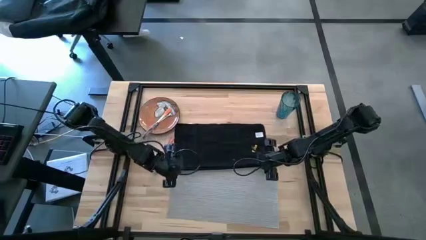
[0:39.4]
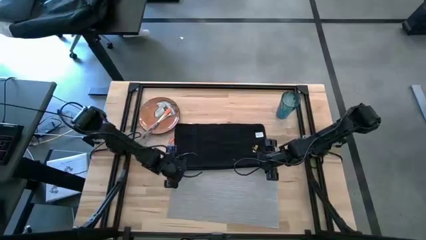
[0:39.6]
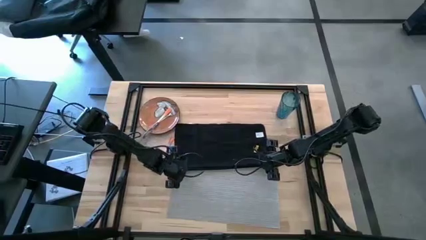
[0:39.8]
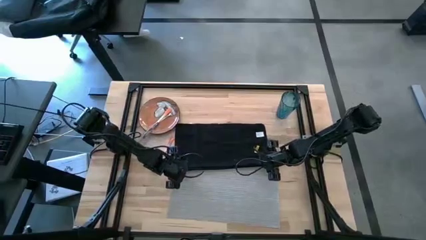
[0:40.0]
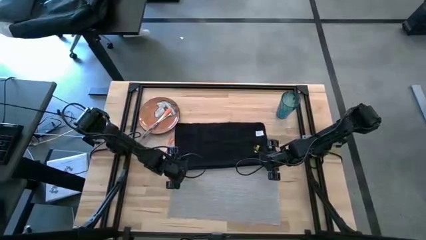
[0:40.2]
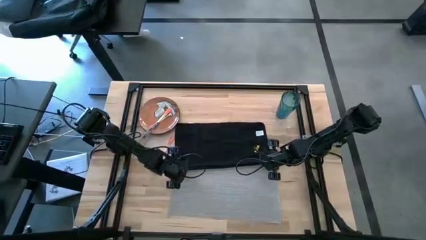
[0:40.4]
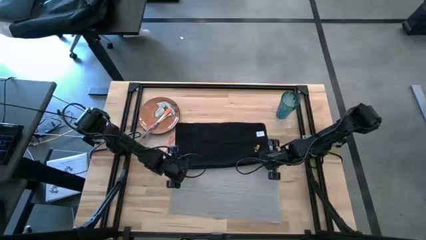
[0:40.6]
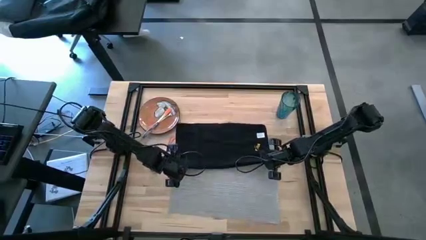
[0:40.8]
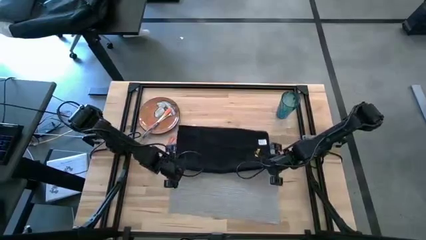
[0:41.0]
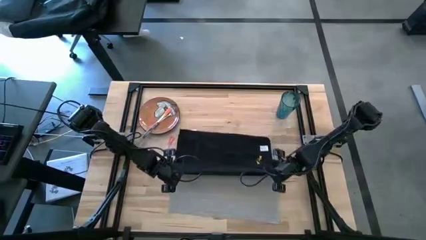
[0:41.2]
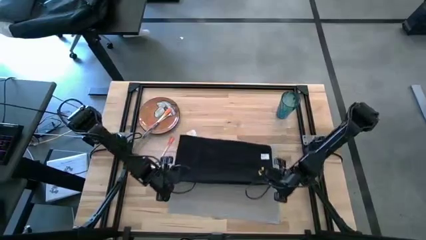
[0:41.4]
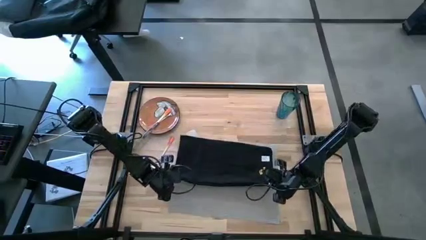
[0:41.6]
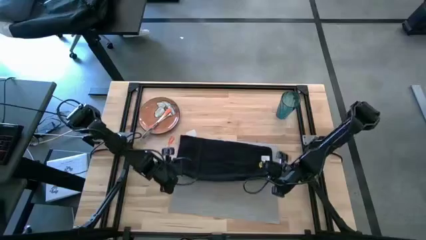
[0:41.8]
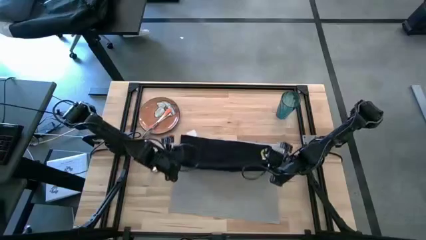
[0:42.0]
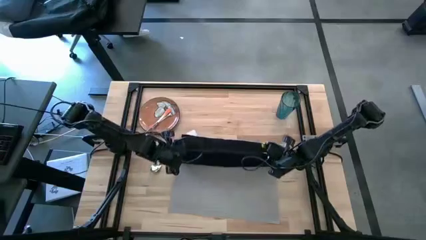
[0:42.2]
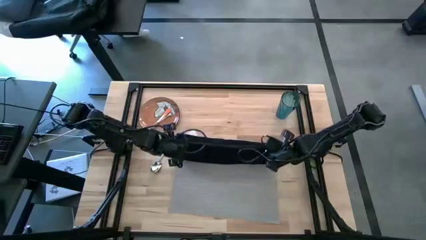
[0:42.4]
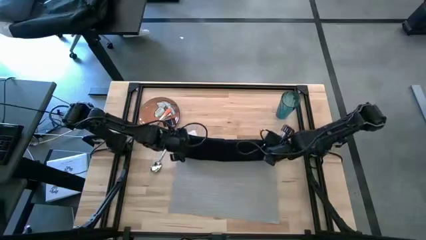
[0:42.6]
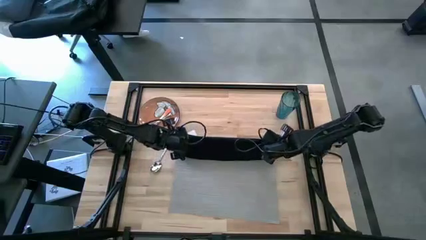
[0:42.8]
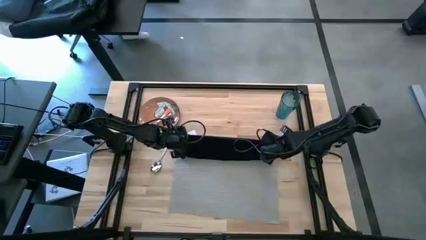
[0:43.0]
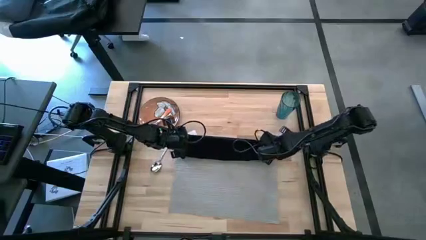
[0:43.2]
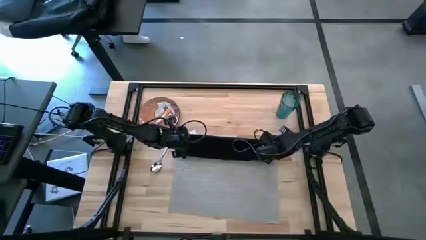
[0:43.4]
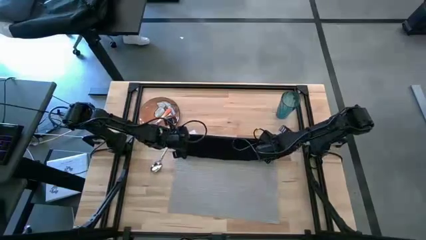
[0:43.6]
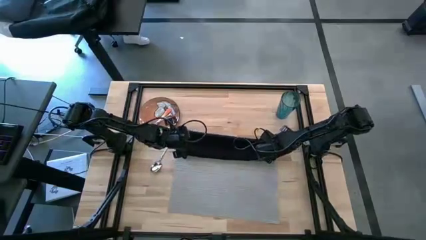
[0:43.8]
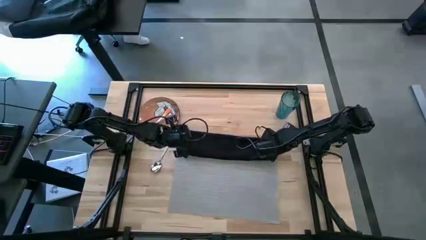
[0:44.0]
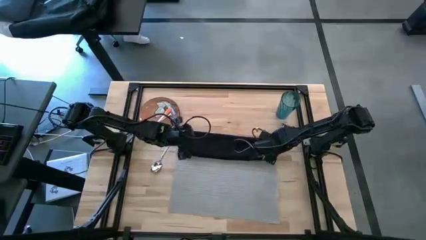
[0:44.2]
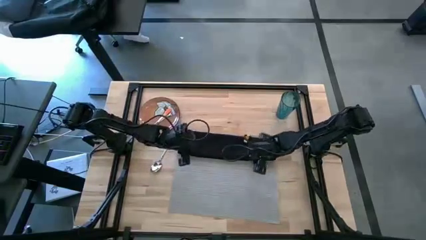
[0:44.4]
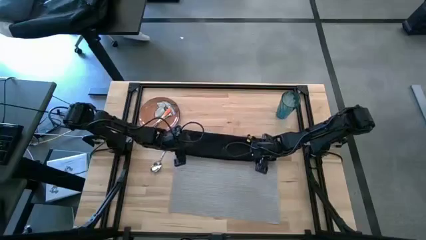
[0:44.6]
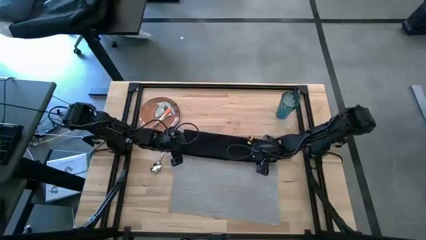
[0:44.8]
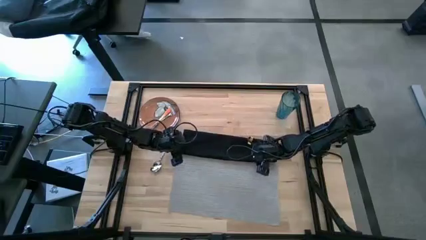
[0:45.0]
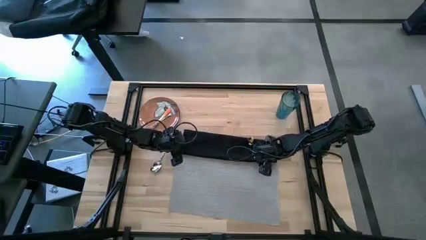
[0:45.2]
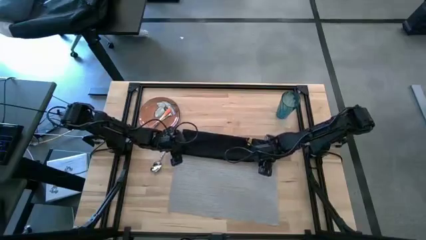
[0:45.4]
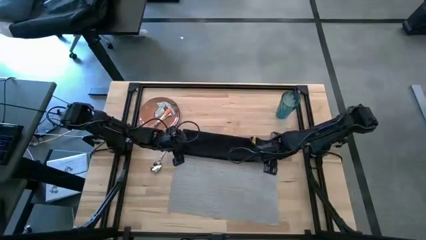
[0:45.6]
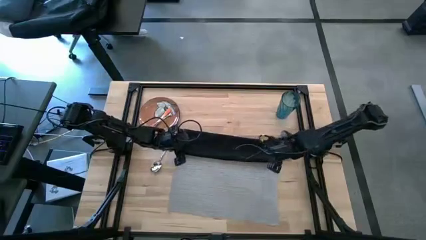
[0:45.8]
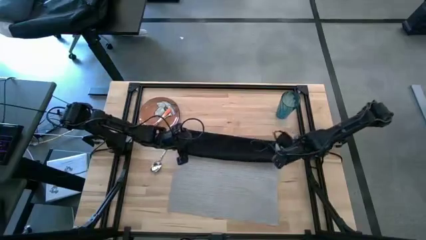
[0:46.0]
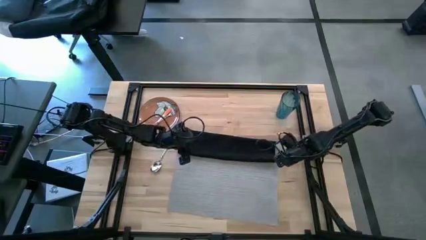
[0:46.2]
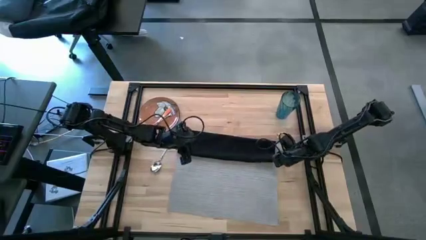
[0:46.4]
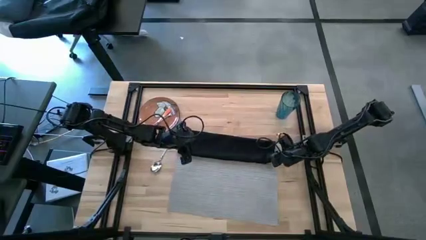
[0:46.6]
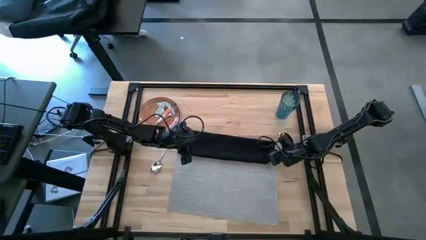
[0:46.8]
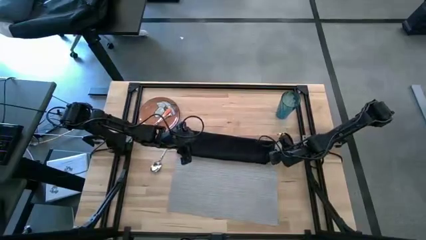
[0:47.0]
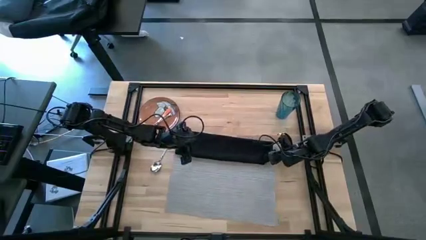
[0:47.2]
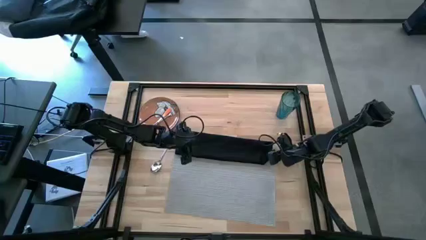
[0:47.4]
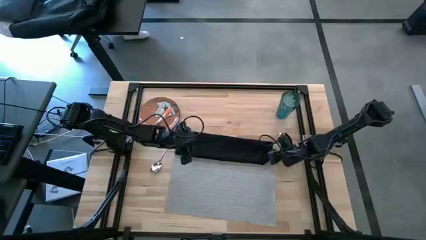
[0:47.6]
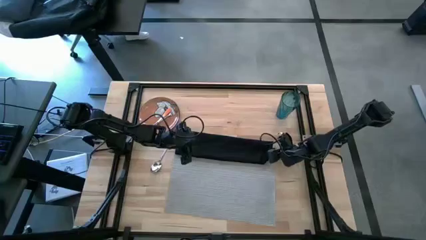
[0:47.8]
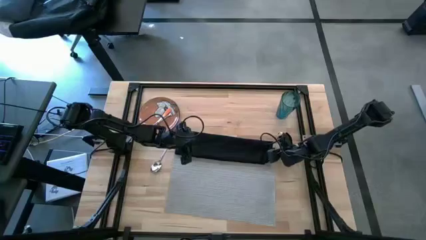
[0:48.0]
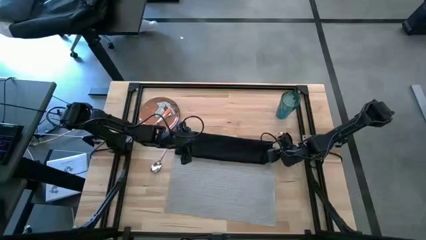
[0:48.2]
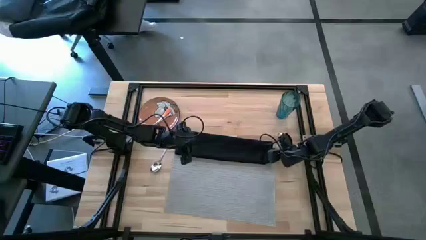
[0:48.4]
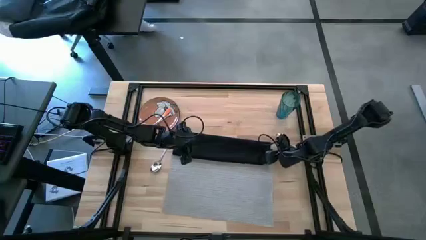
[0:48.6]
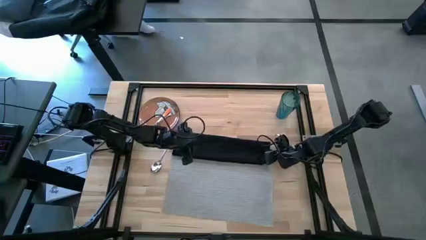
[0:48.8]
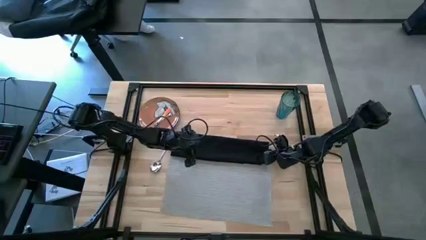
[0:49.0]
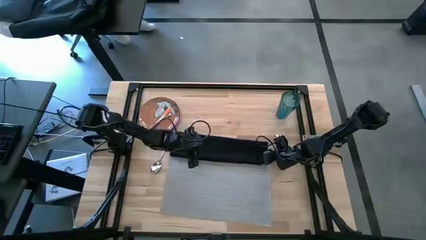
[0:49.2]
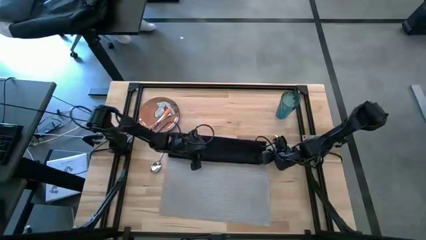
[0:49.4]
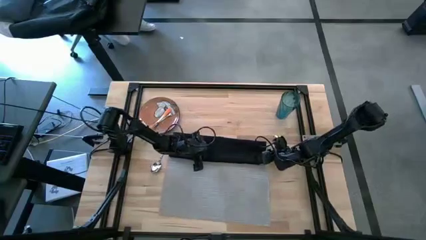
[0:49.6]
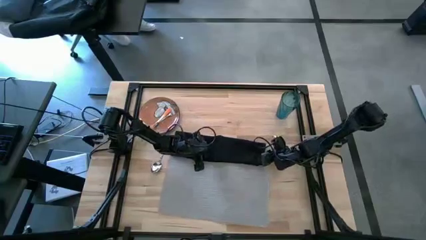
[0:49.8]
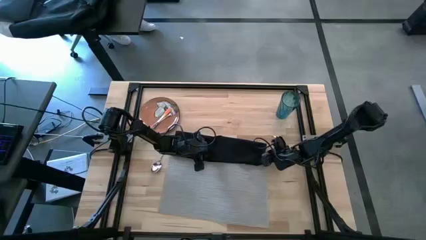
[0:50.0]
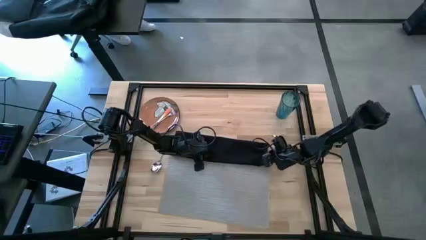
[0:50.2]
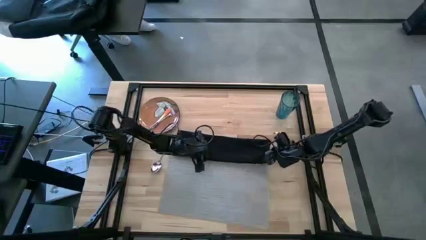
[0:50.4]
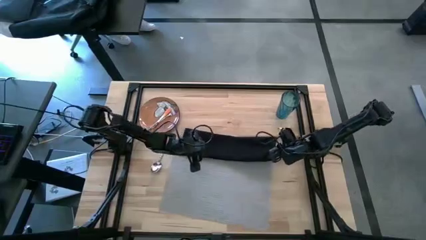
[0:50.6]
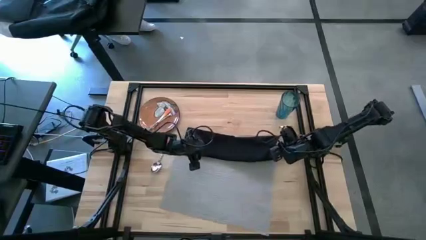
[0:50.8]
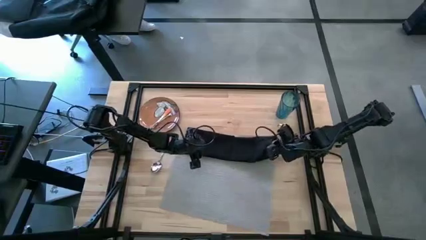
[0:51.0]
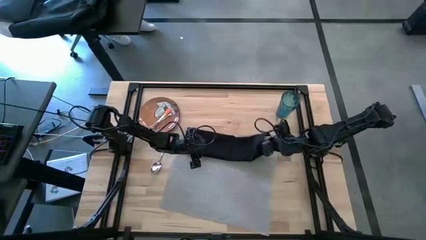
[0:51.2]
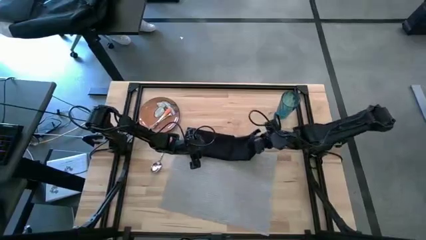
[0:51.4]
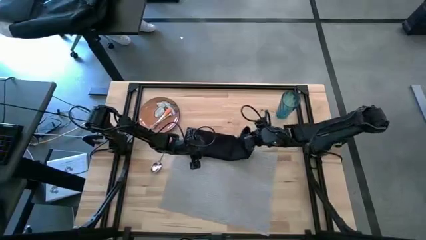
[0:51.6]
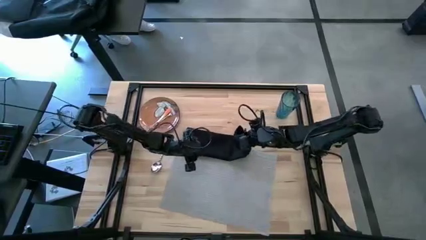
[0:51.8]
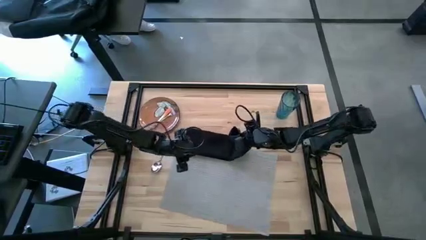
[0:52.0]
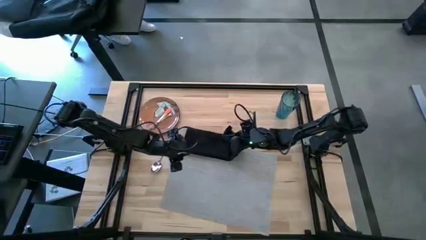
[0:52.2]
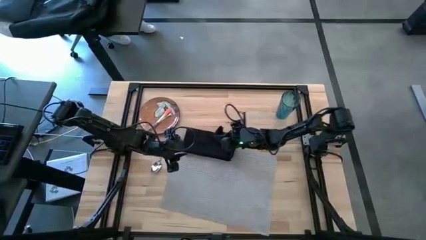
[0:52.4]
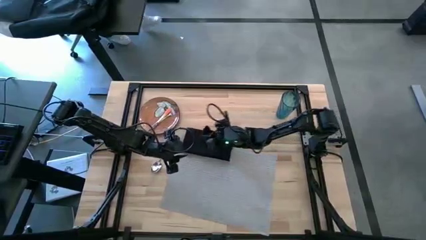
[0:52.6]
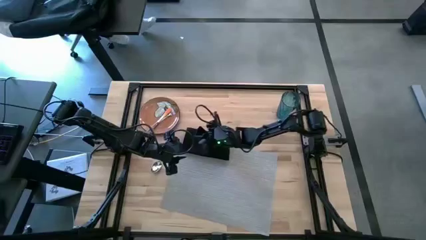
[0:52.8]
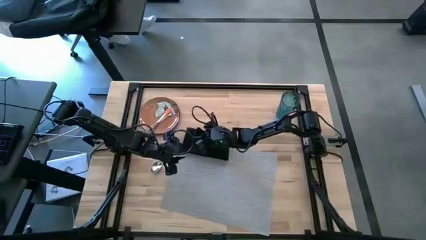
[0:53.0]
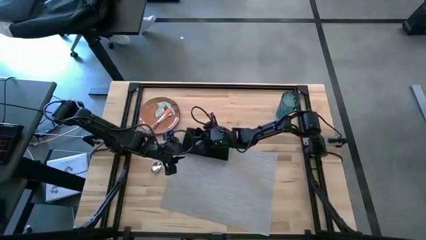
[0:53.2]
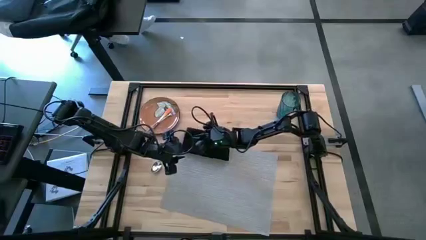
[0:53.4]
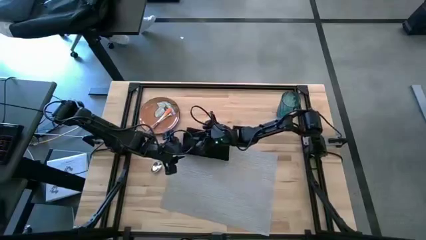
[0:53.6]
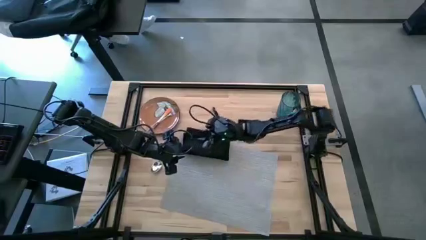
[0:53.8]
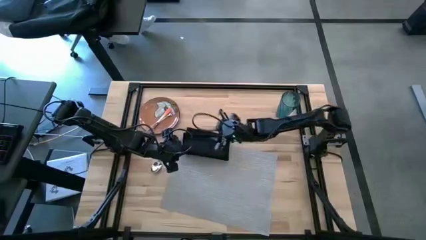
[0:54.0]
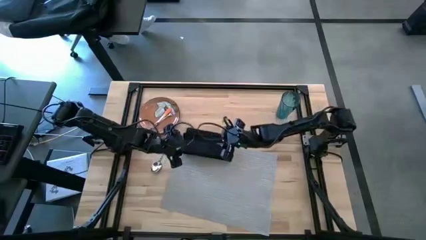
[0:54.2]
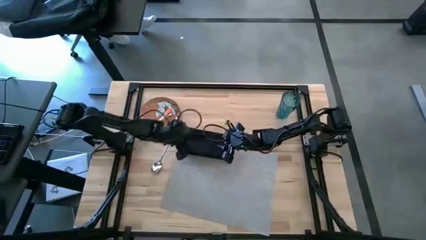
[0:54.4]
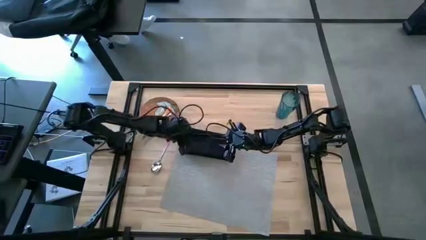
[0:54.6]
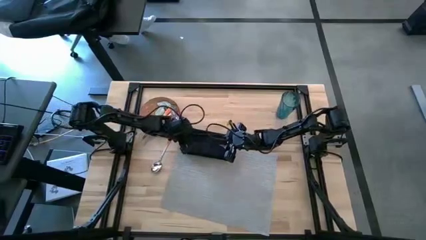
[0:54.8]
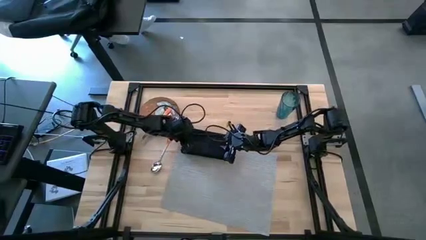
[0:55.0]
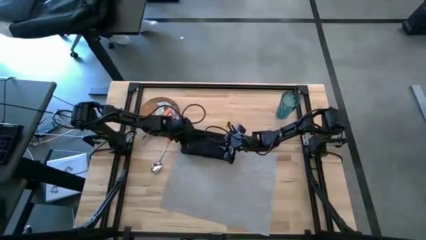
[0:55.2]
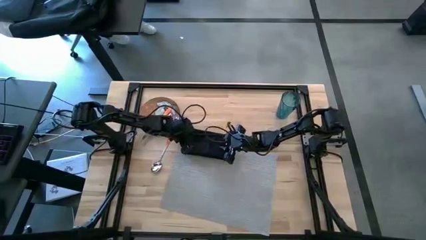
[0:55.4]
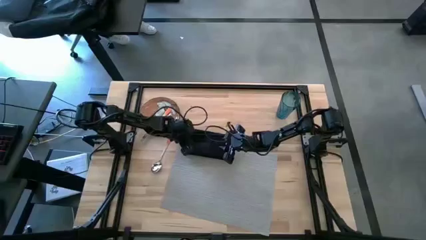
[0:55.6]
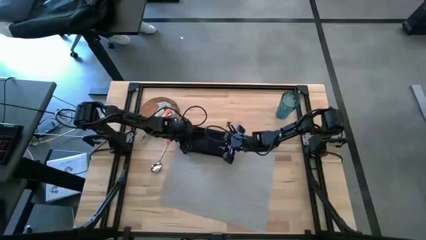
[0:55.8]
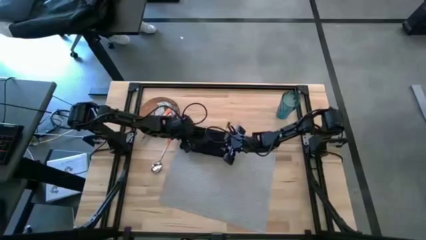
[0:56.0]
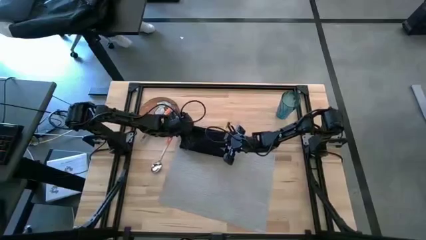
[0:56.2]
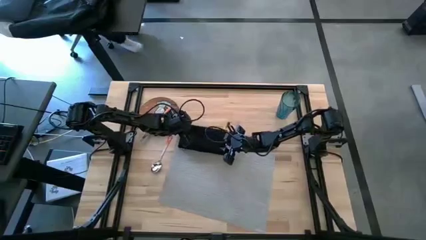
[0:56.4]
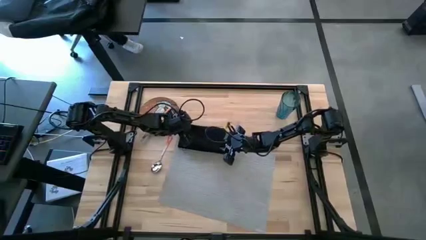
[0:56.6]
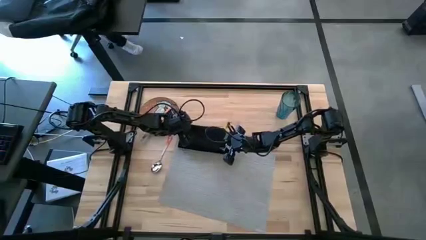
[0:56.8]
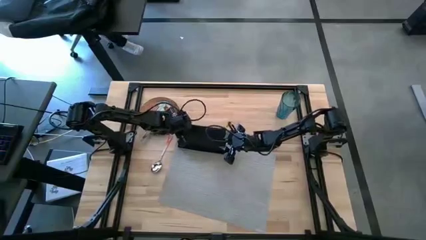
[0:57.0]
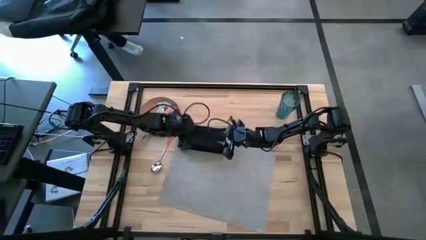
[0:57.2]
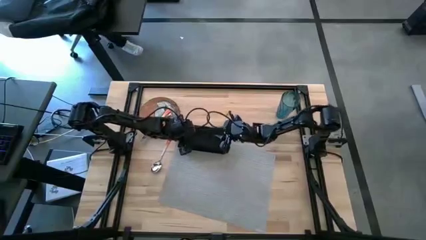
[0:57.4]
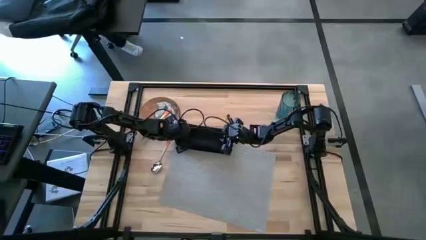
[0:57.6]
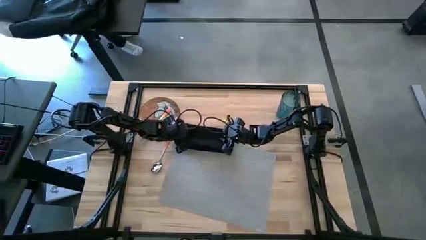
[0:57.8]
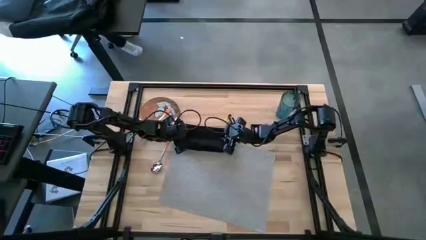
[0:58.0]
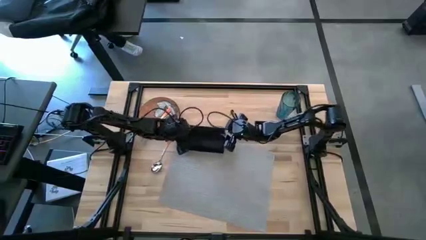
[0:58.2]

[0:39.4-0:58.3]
Task: Set table place
Fold the black napkin
